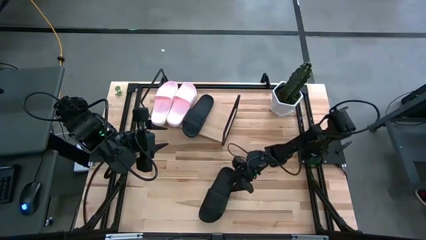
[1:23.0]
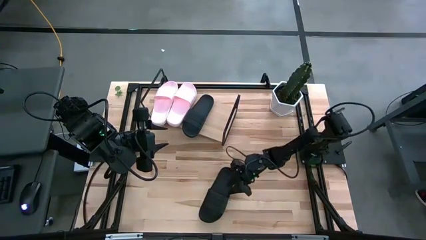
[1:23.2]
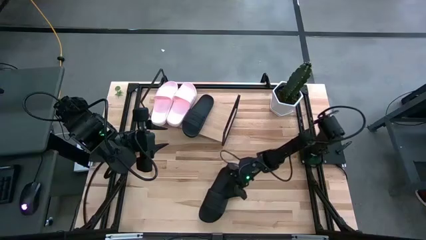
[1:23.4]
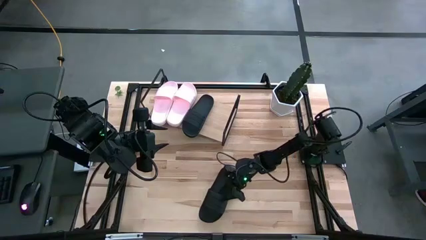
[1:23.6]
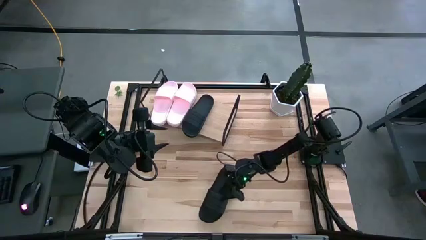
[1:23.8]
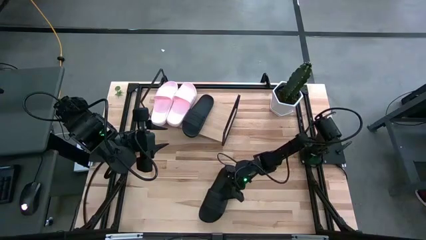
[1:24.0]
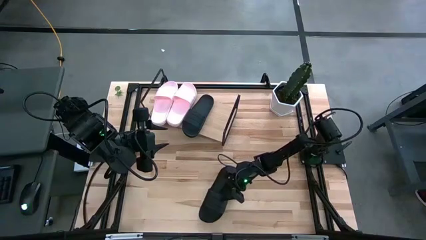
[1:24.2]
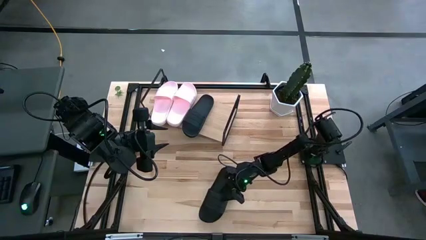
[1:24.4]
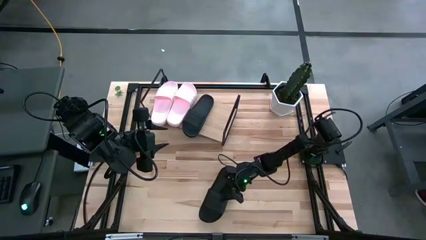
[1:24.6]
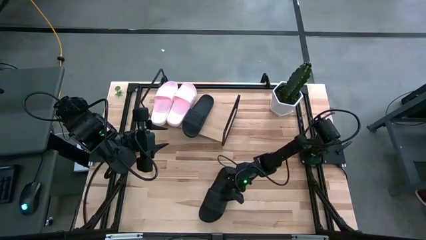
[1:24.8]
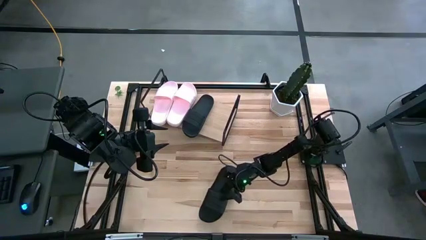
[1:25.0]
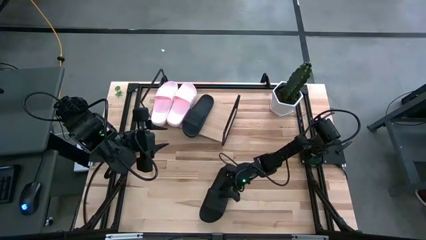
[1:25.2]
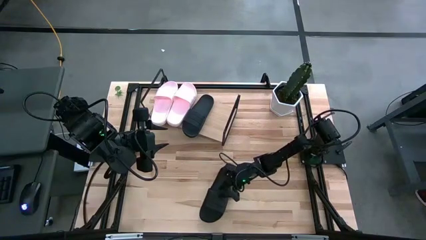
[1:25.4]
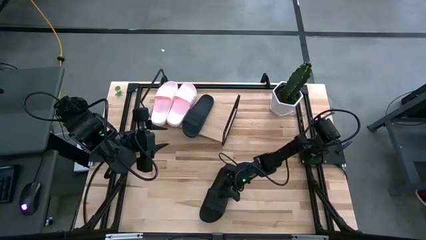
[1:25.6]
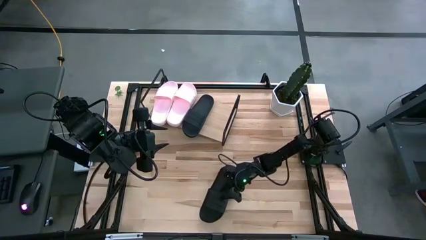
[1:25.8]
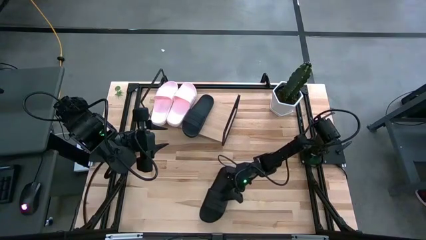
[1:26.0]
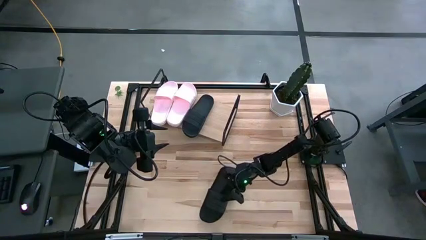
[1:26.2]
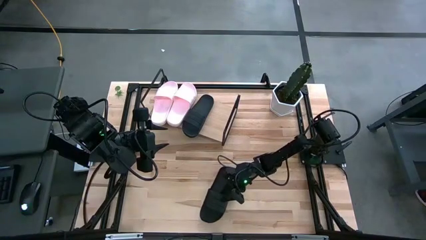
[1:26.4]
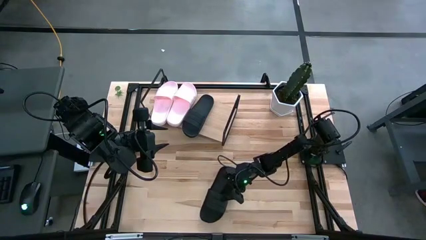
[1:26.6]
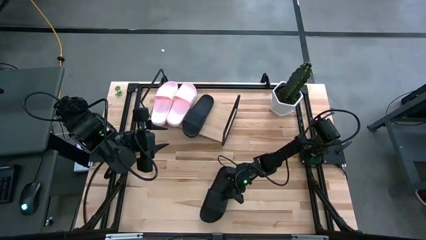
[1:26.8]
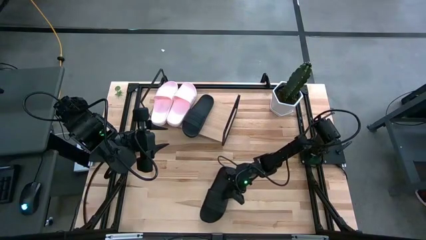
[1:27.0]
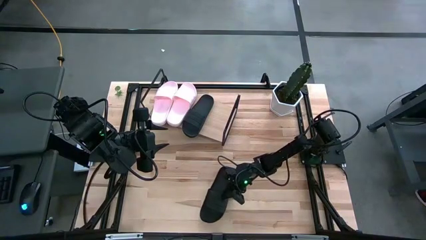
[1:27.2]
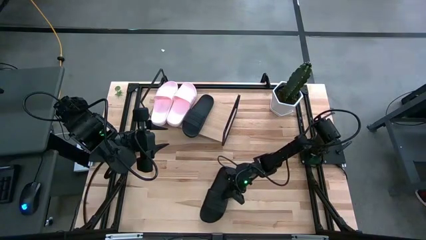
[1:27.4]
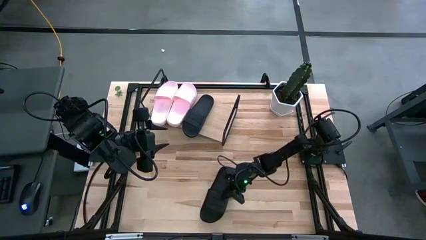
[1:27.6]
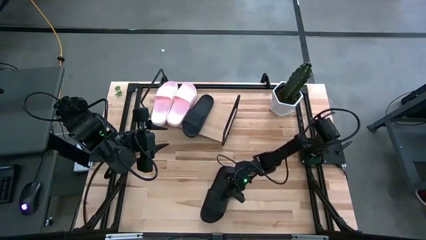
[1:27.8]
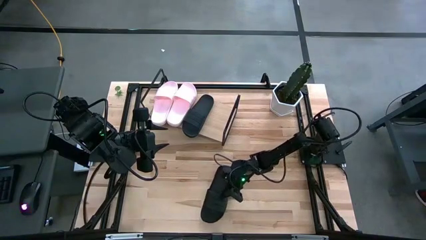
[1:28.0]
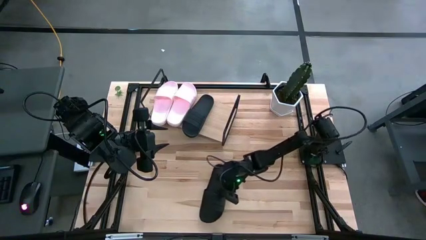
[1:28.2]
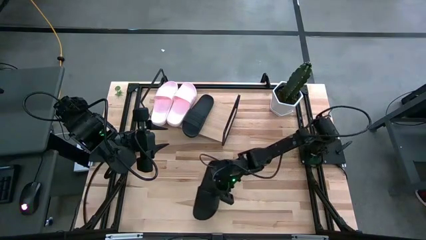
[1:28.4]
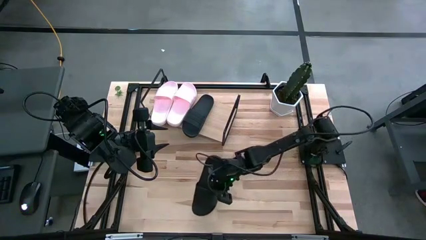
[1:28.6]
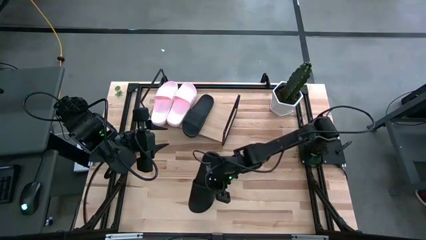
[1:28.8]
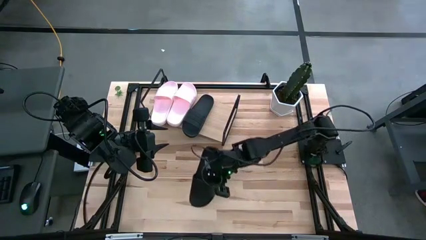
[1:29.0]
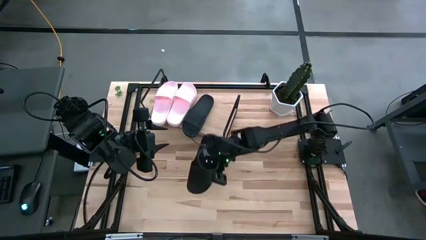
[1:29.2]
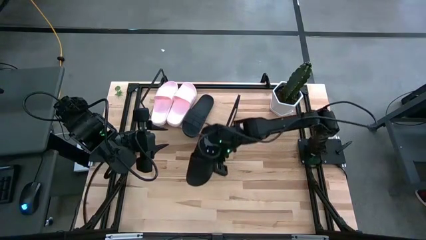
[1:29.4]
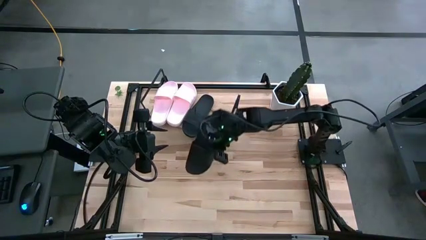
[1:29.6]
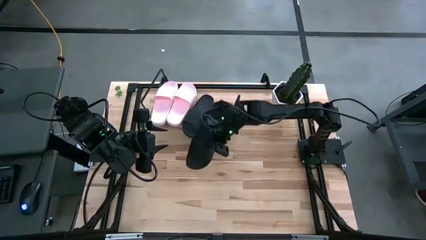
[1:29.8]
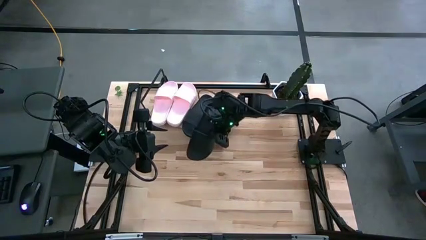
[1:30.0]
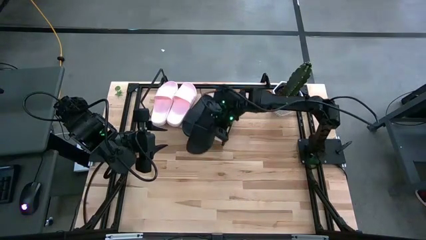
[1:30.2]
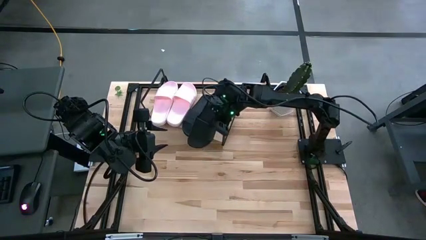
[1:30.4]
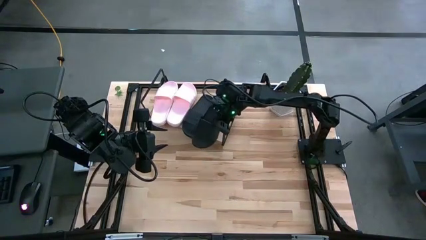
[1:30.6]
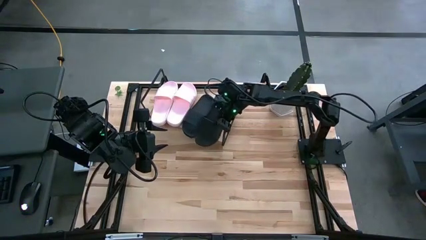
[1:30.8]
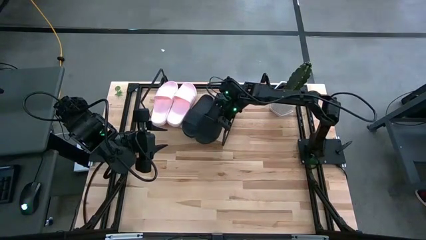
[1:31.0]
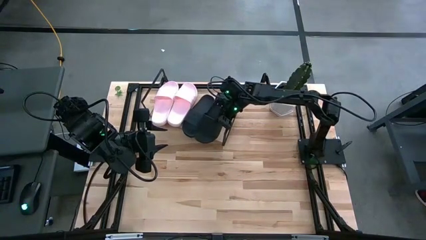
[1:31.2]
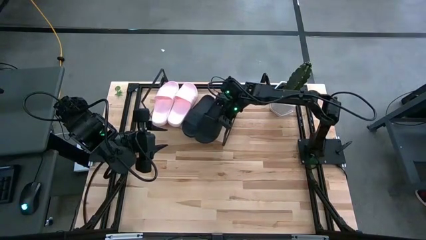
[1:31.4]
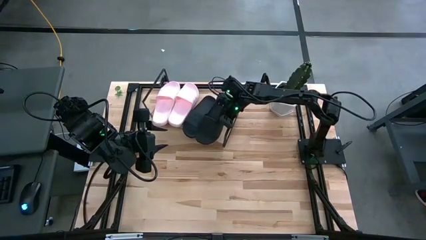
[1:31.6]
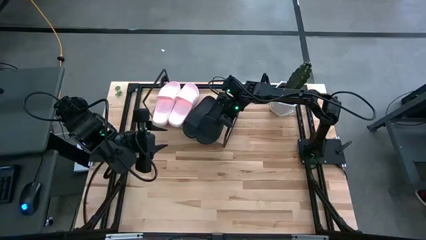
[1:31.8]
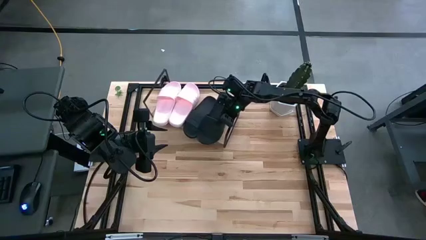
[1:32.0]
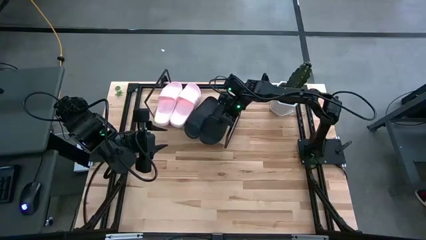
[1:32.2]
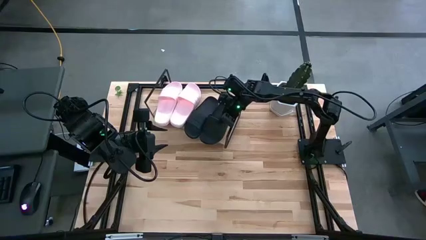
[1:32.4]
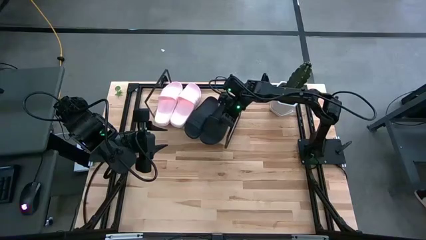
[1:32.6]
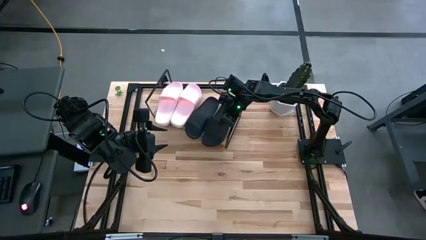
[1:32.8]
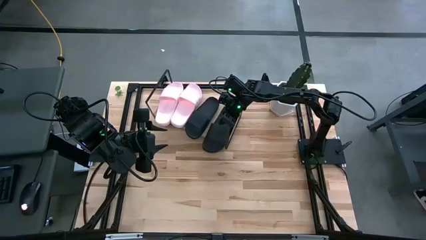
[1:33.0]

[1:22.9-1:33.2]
Task: Pick and place slides into the shelf
Put the black slide on the shelf

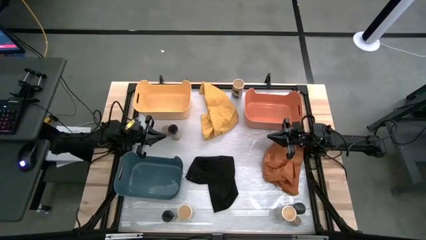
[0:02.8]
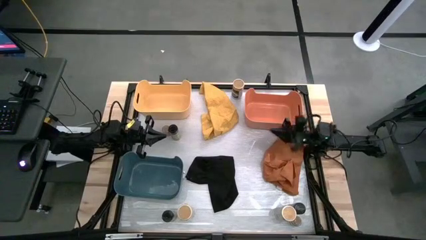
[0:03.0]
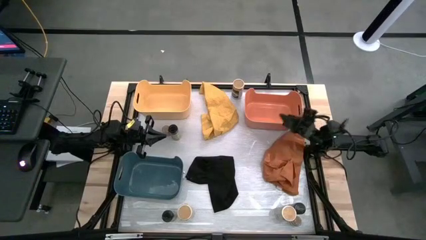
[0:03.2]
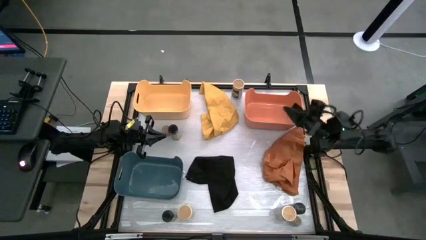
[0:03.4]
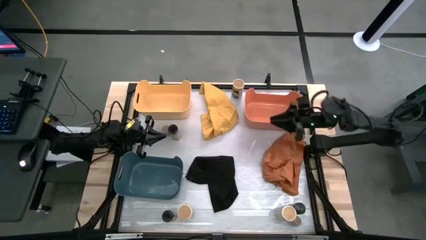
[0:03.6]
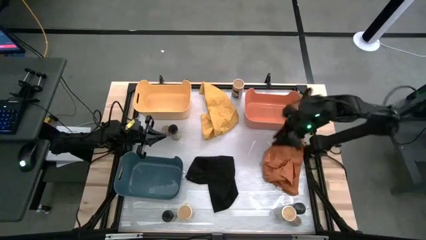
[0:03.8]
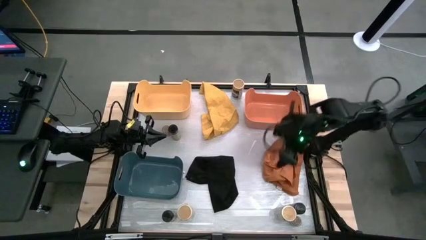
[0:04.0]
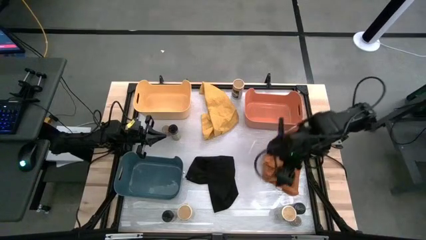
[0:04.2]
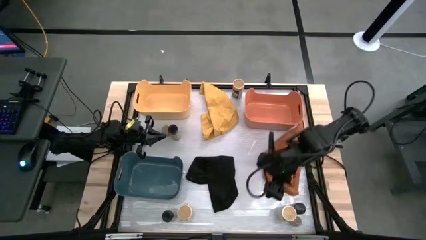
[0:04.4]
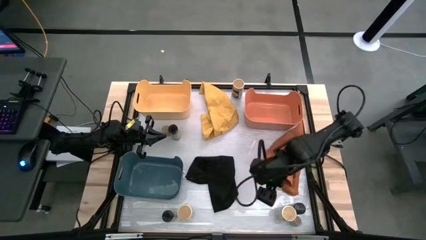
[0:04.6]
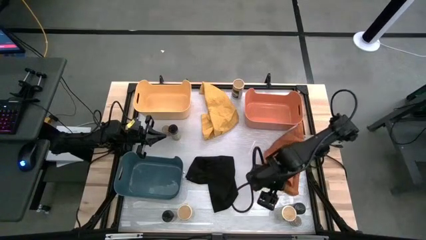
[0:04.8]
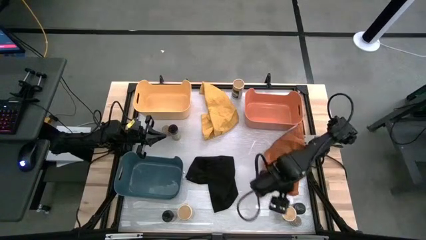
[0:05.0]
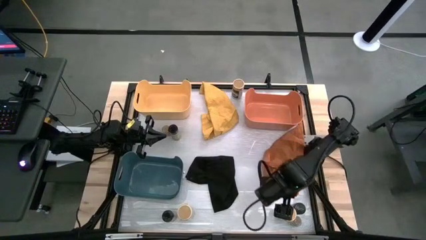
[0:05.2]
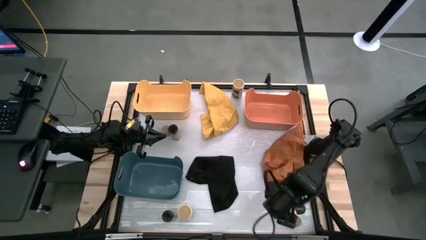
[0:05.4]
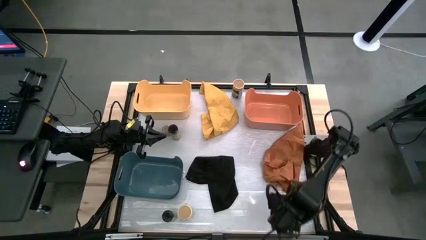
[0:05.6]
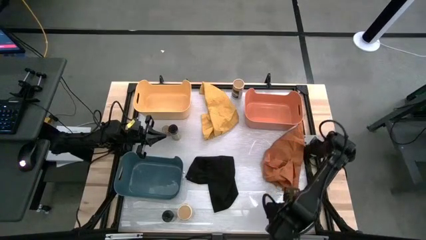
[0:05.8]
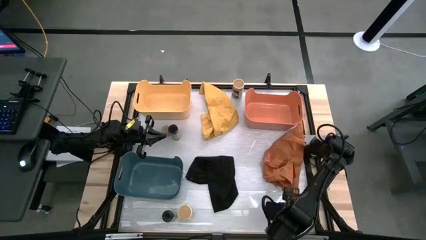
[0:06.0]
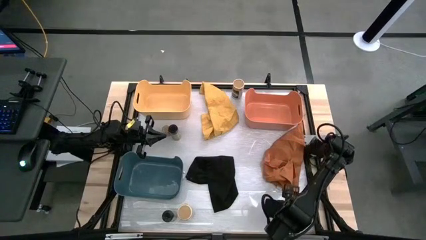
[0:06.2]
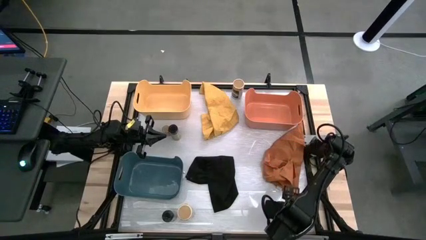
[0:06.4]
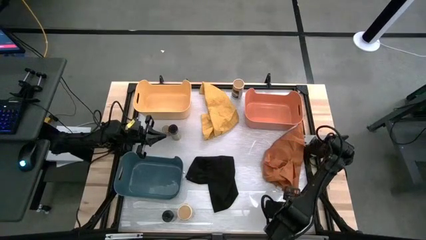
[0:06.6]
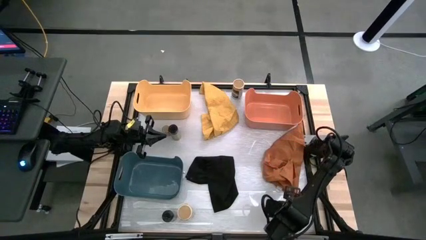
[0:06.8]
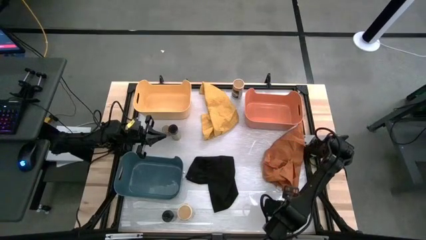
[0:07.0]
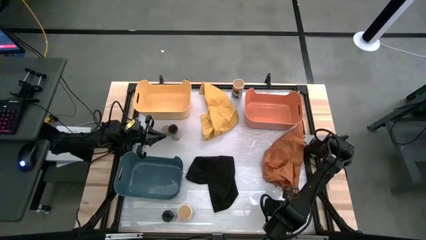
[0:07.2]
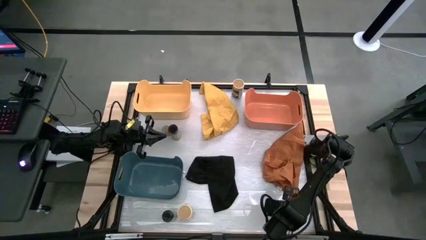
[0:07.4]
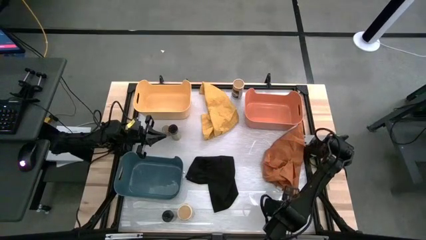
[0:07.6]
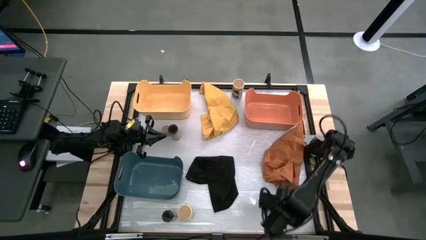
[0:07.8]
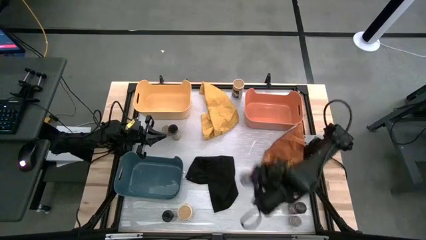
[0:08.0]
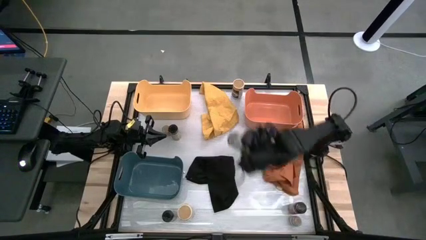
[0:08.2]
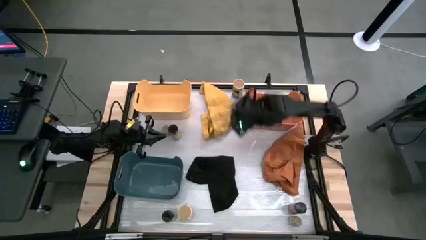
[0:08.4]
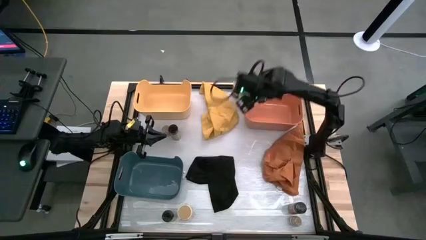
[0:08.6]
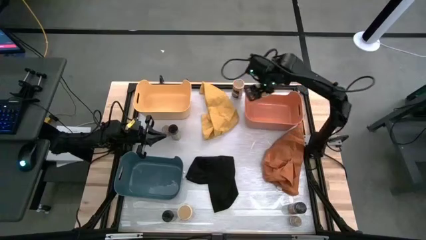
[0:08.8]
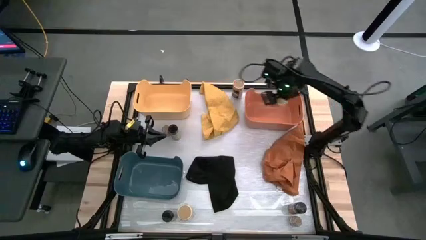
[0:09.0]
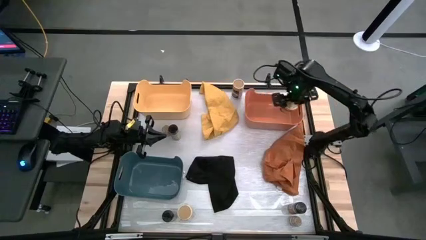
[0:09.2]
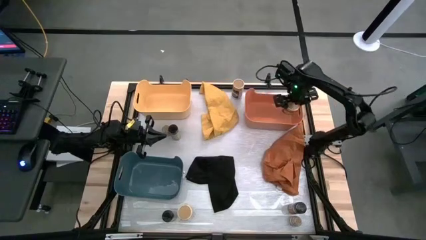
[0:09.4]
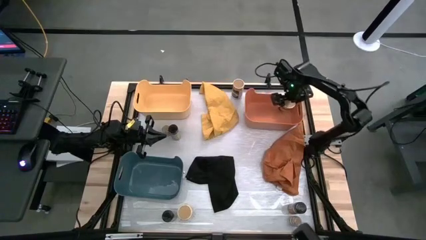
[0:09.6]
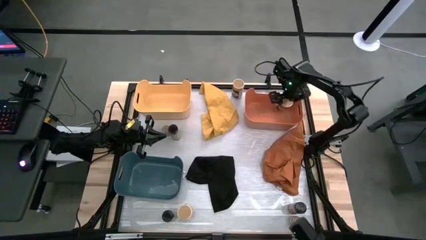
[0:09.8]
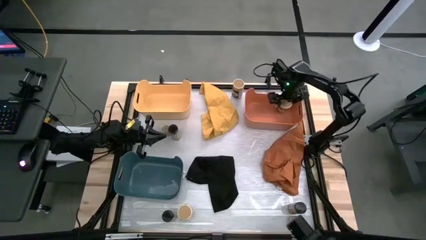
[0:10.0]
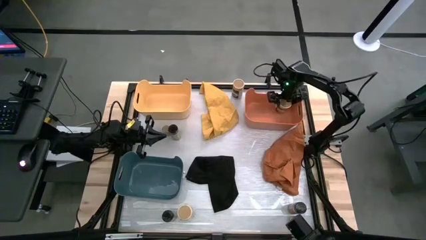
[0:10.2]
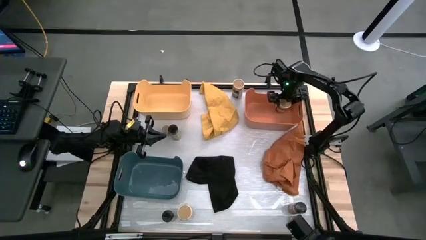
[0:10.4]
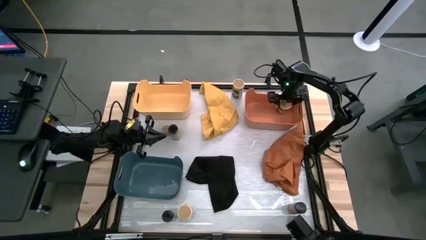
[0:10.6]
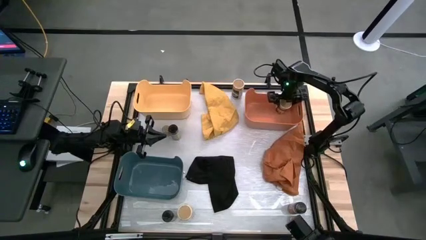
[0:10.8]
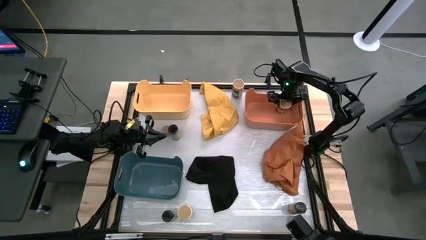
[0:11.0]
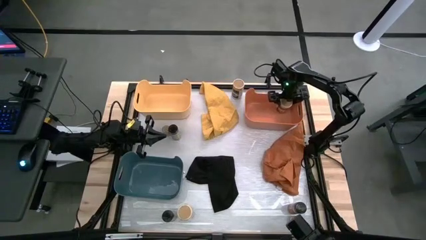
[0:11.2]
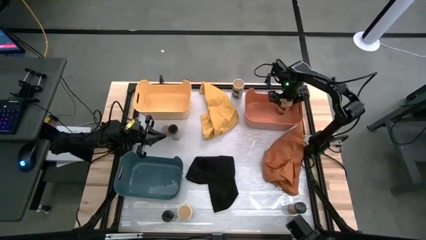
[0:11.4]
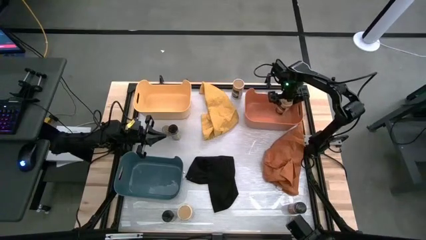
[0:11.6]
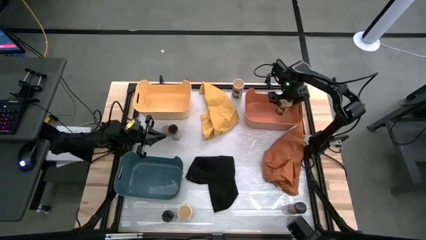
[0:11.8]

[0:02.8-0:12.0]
Task: Sort spices by type
Put the bottom right gold spice bottle into the orange bin
